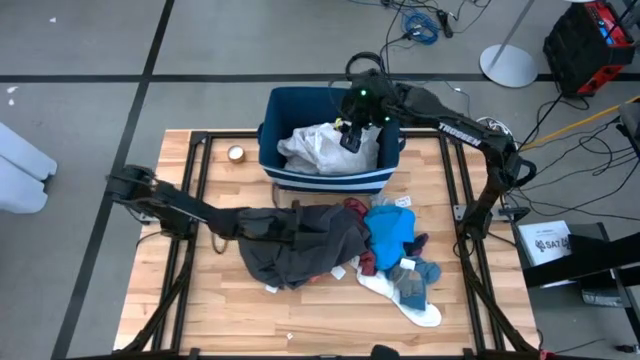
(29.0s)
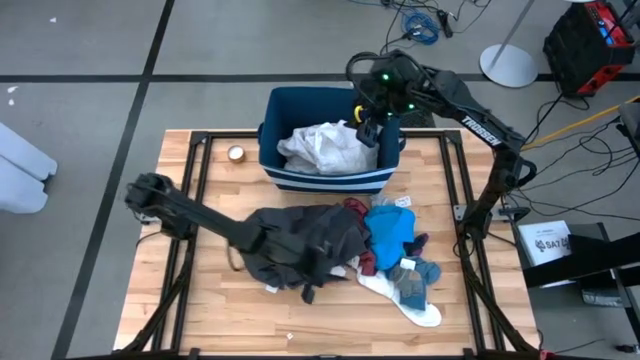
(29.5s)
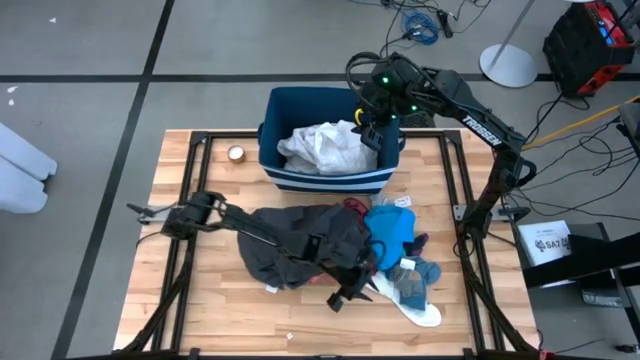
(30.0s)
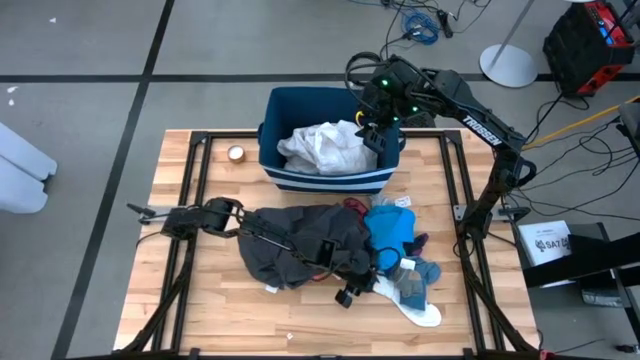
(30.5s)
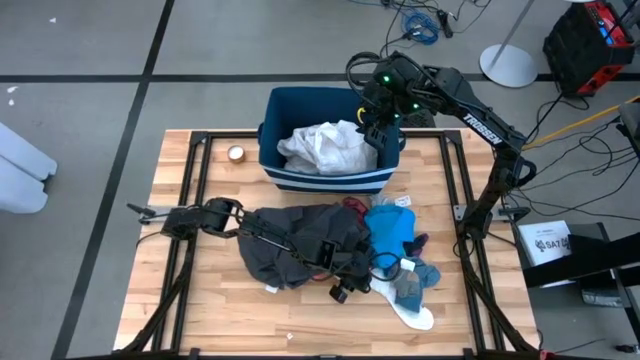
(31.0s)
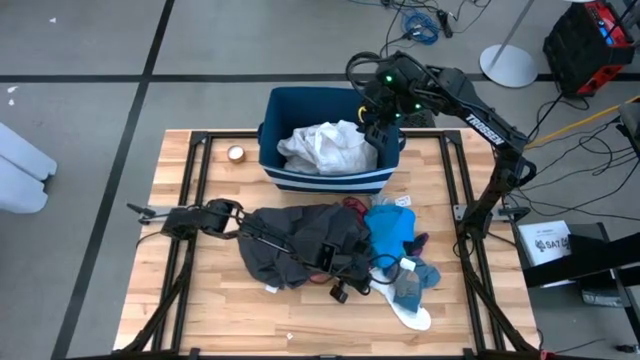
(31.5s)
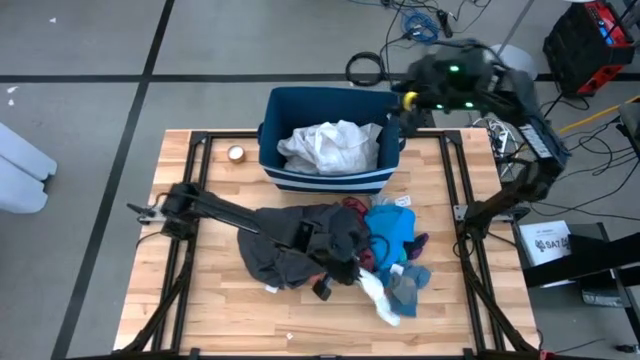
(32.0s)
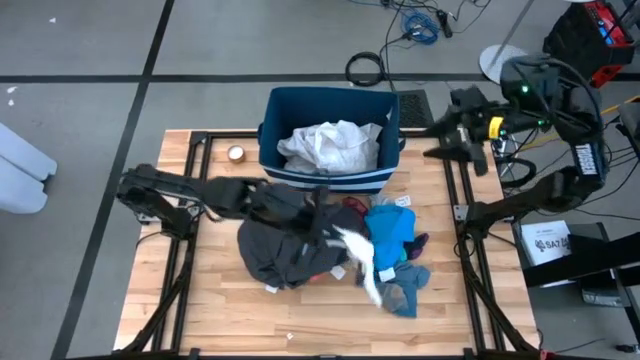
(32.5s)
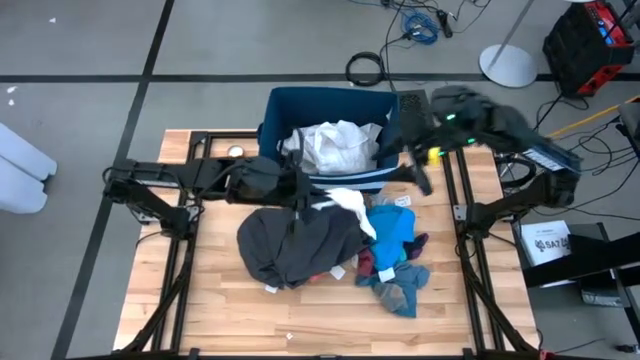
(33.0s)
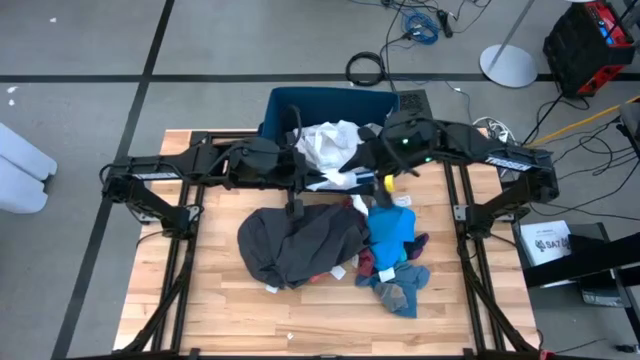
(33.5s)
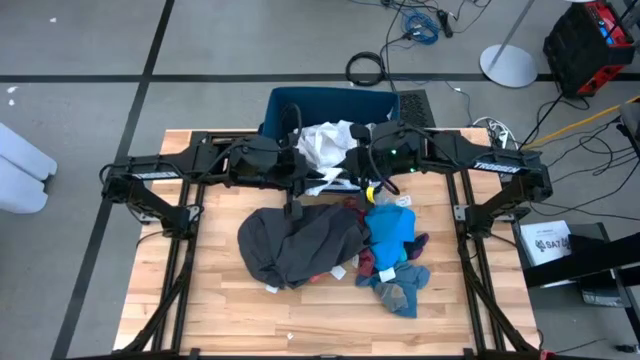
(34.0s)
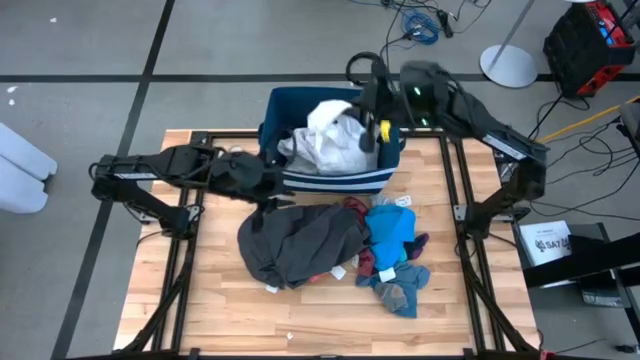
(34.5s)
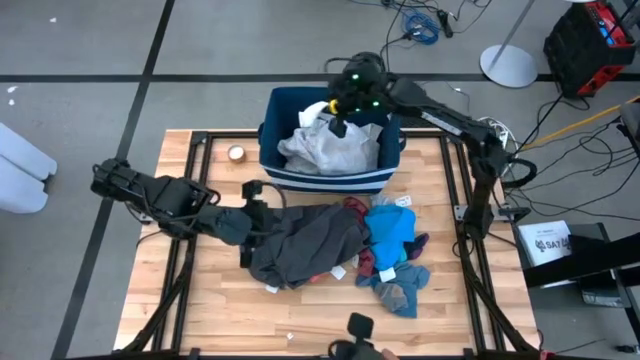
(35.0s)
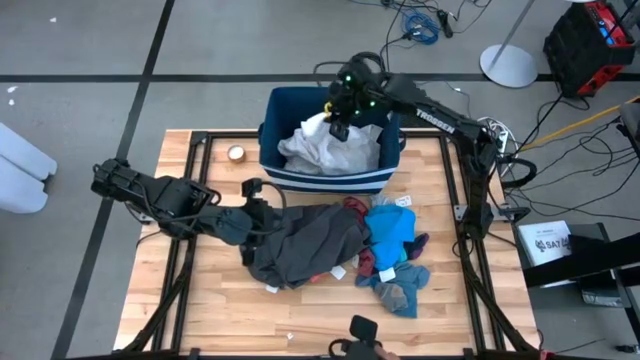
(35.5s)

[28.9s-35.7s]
Task: Sort clothes
Put the white sock into the blue bin

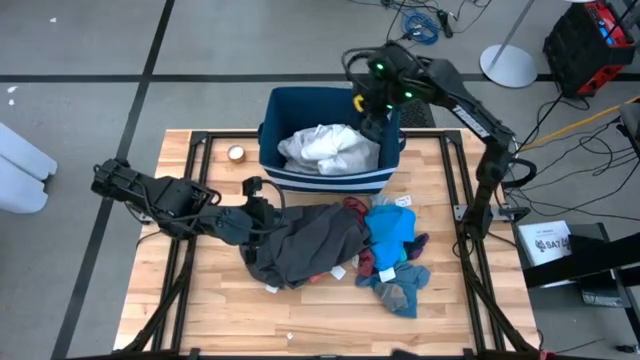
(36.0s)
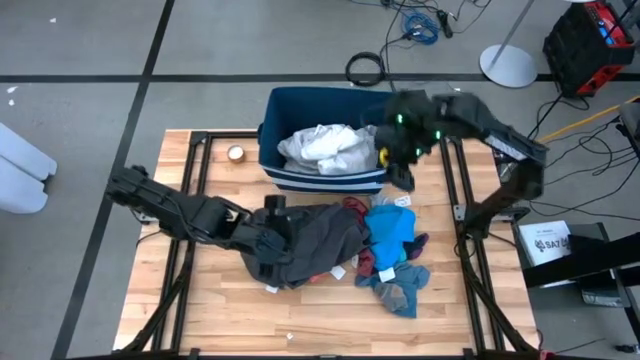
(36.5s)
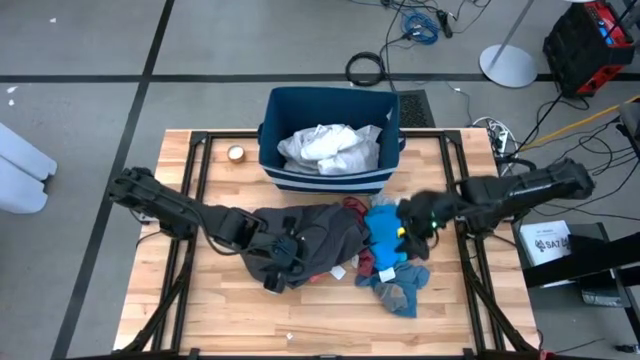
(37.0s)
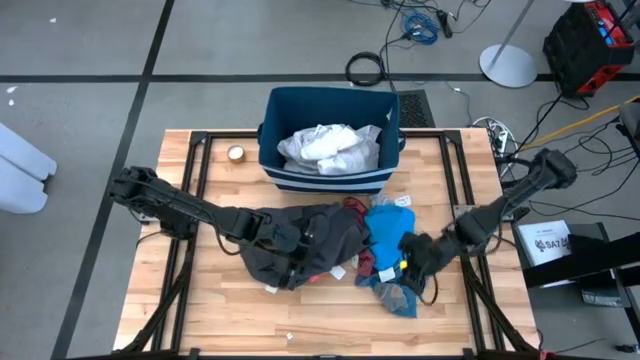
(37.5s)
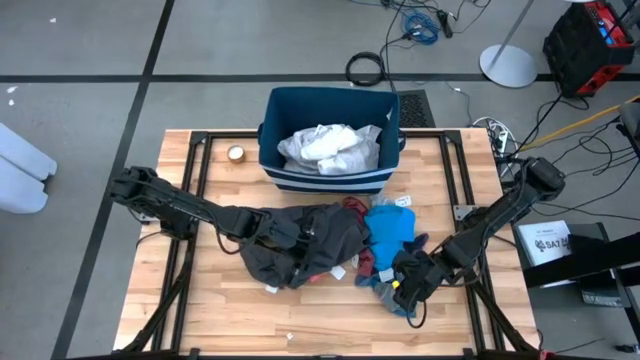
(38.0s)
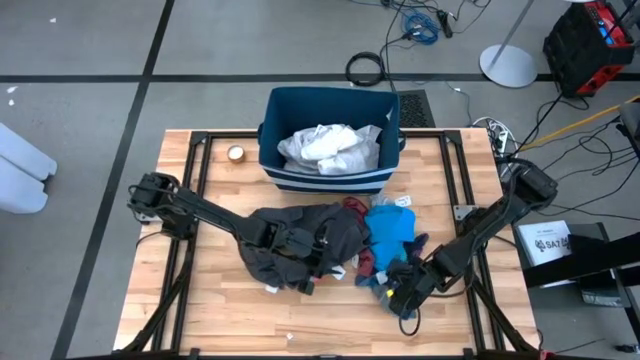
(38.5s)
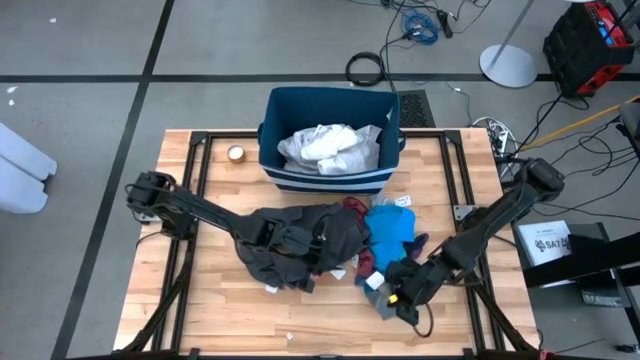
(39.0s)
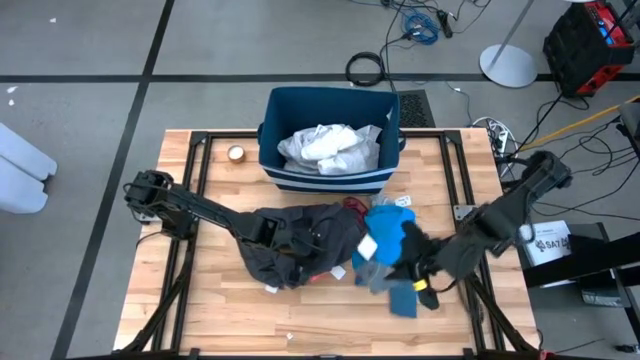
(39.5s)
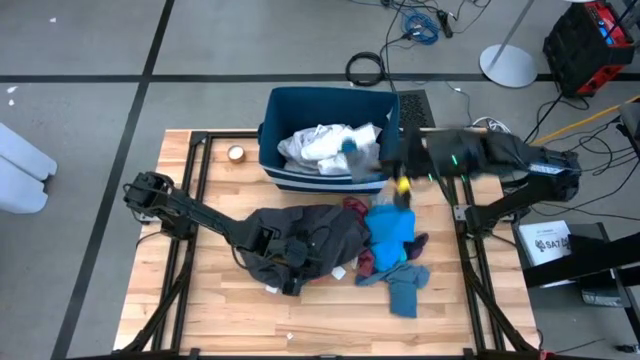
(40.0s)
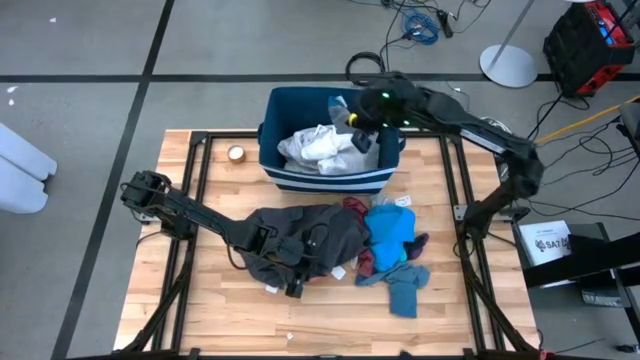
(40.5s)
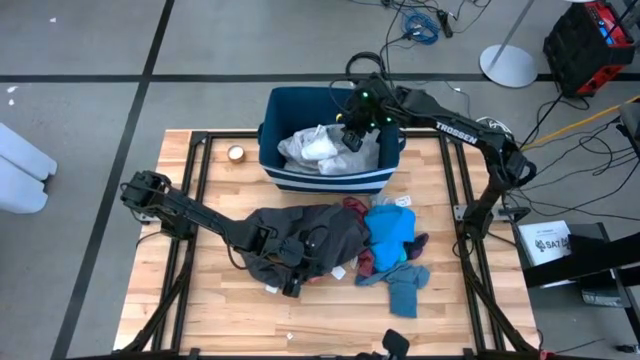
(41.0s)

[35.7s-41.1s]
Put the gray sock into the blue bin

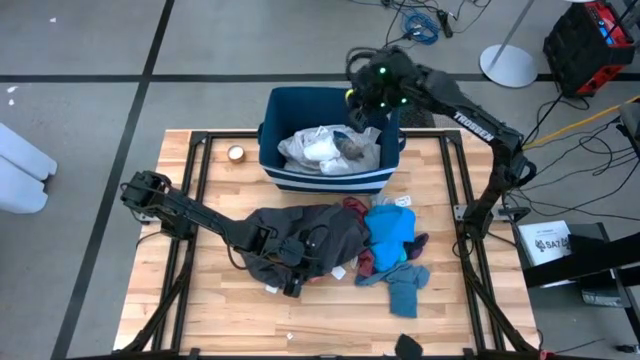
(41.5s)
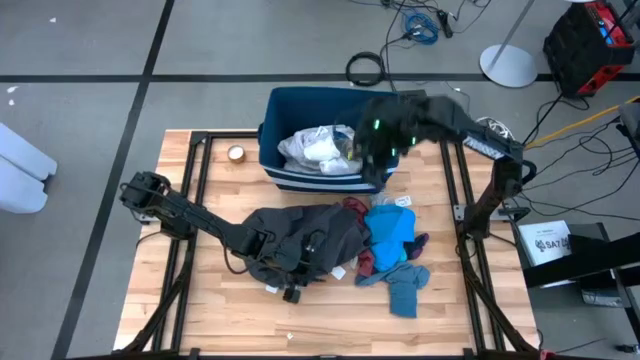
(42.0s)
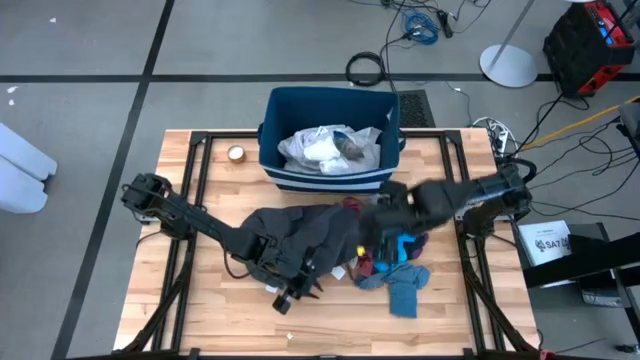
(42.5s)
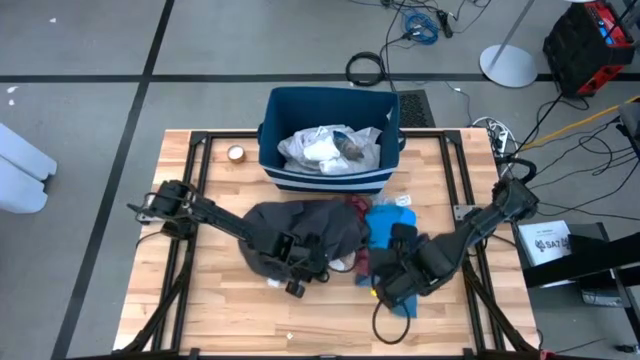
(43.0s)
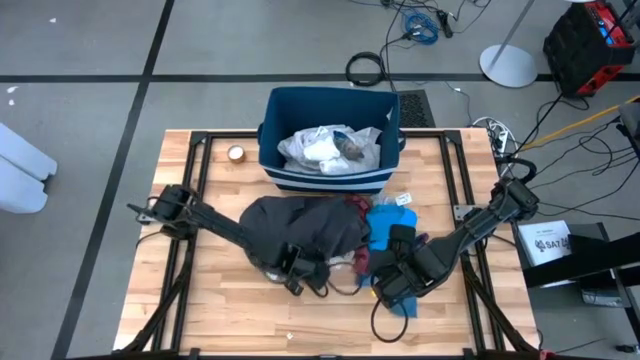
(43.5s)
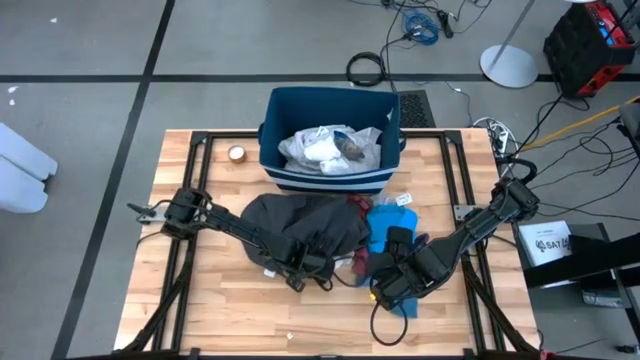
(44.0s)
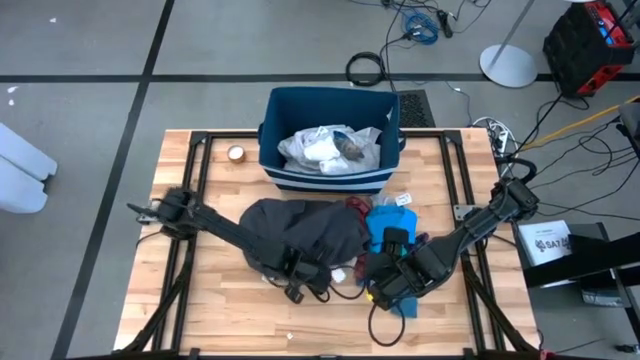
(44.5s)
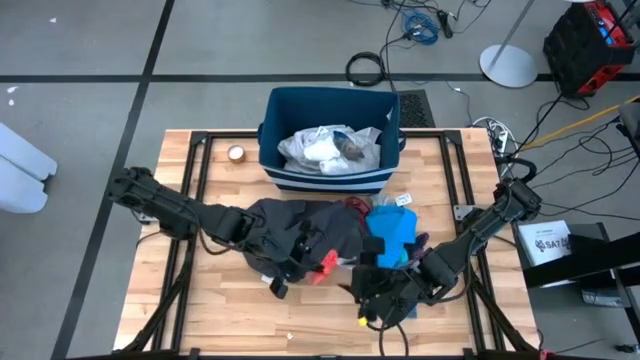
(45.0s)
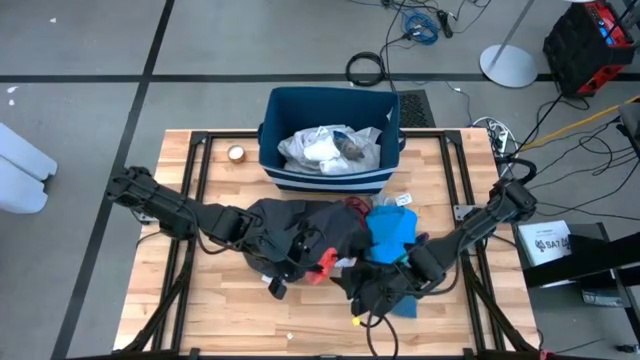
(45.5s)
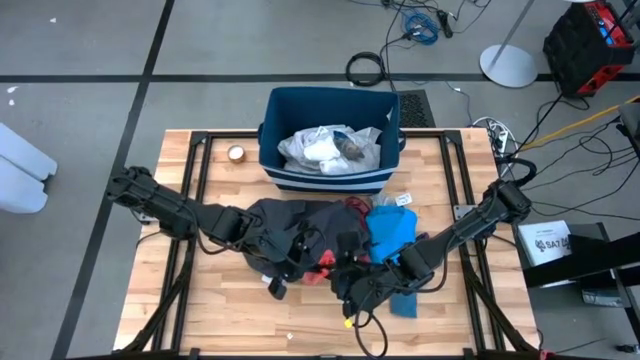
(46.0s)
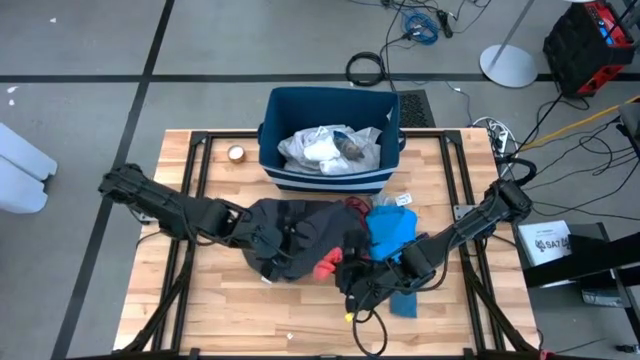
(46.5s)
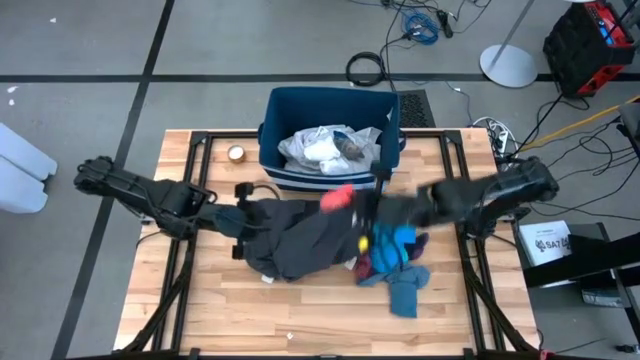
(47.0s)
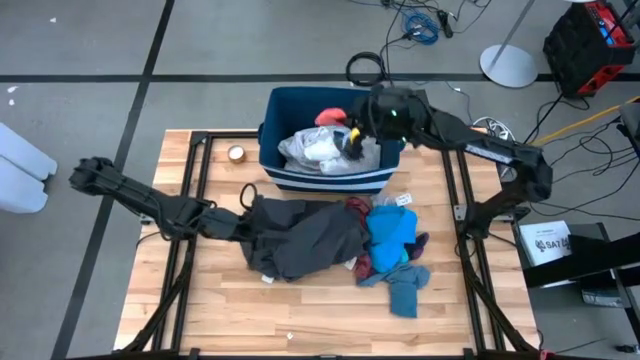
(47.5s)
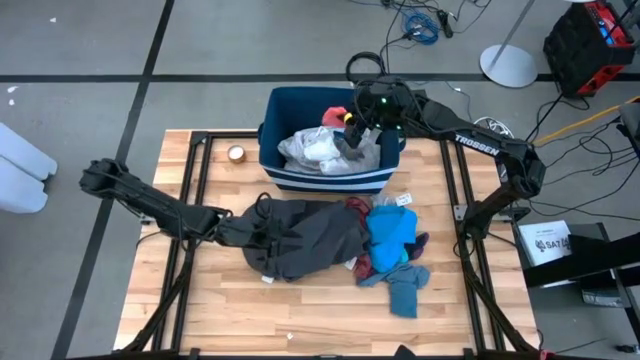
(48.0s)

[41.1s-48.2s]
Put the orange sock into the blue bin

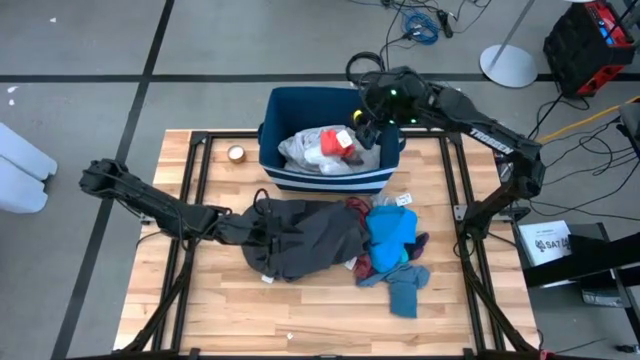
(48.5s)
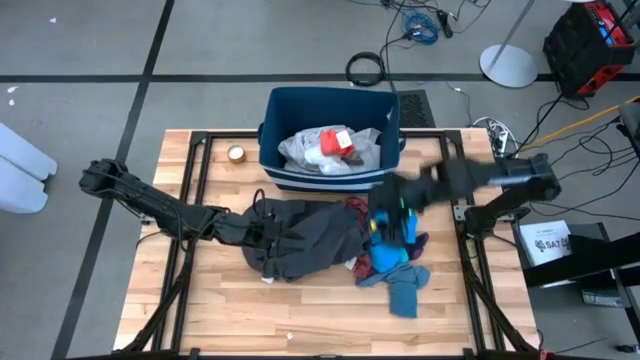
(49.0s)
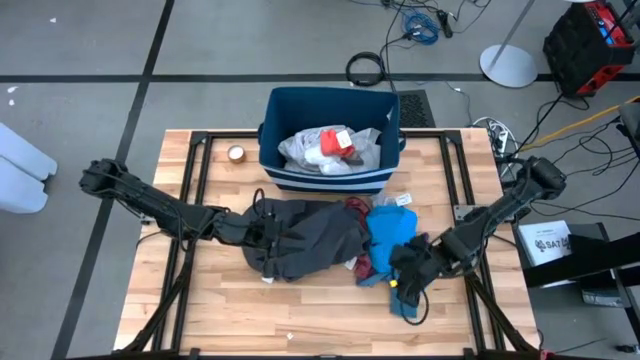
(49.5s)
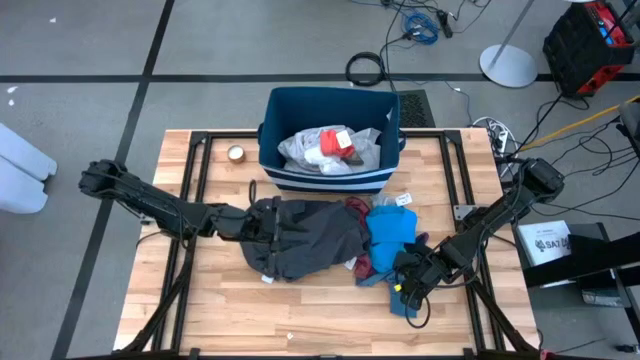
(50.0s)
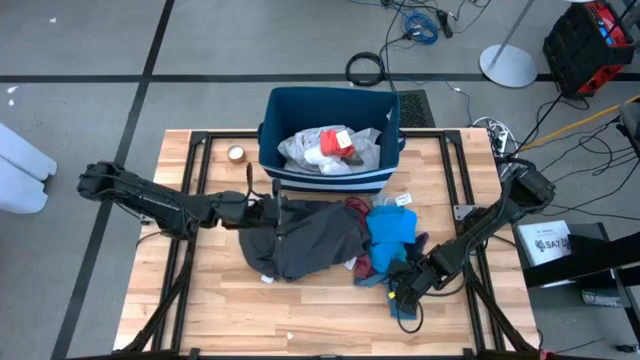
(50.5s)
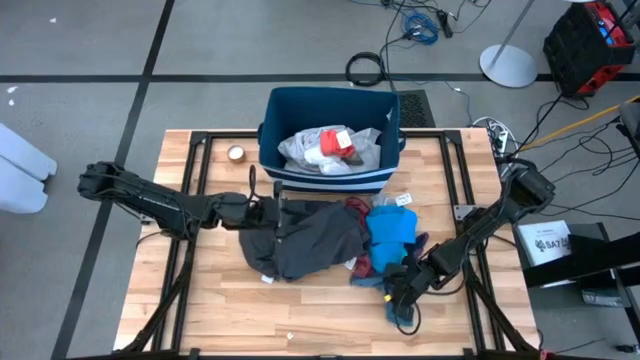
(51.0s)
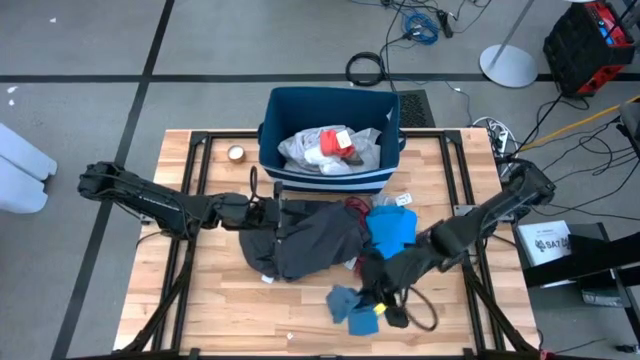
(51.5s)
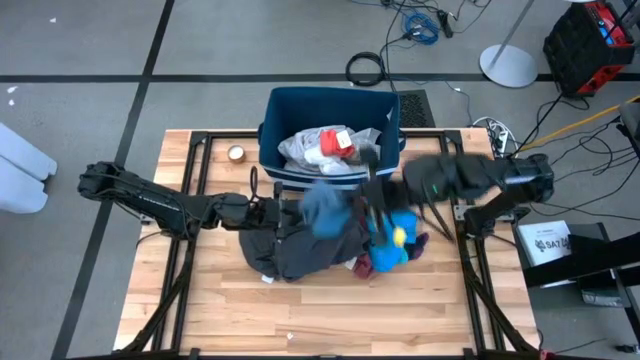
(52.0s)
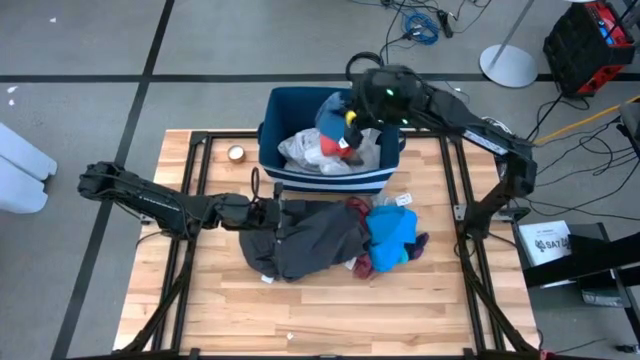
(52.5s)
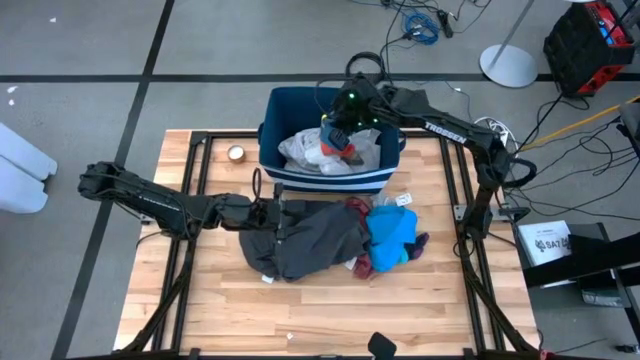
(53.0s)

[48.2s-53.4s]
Put the blue sock into the blue bin
